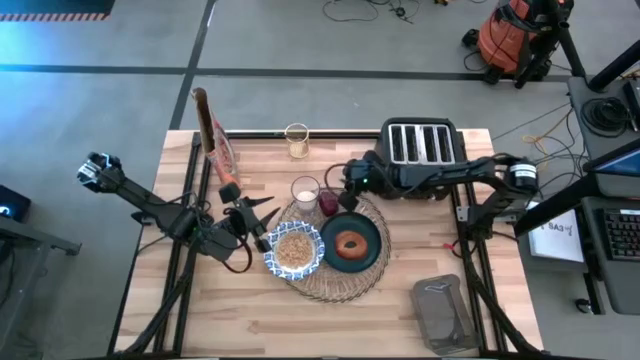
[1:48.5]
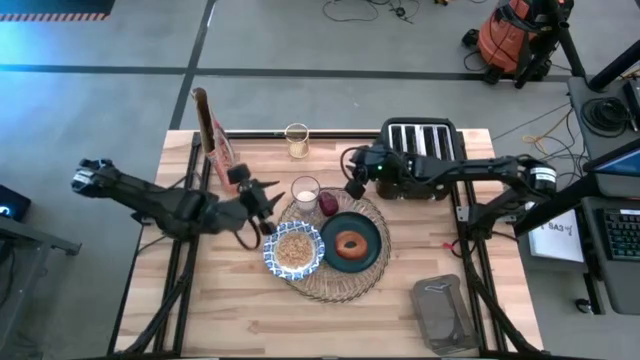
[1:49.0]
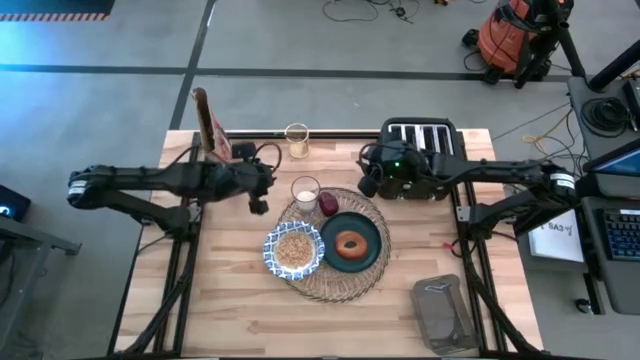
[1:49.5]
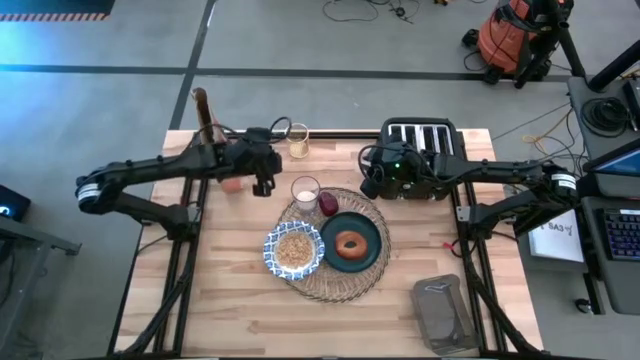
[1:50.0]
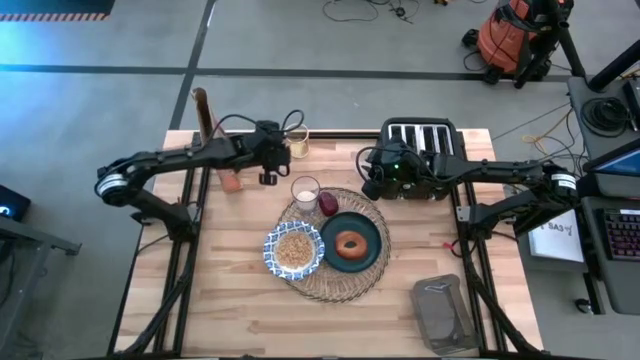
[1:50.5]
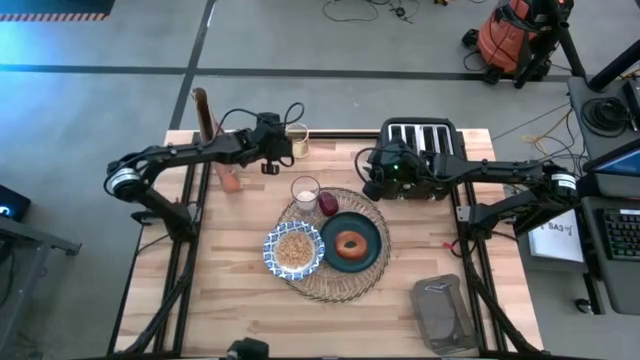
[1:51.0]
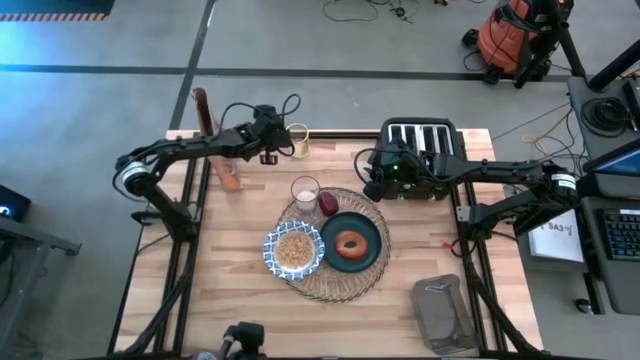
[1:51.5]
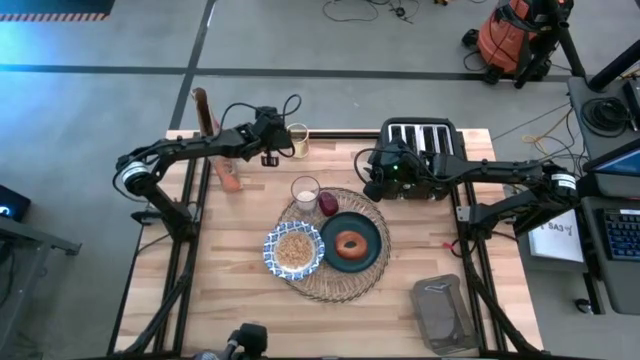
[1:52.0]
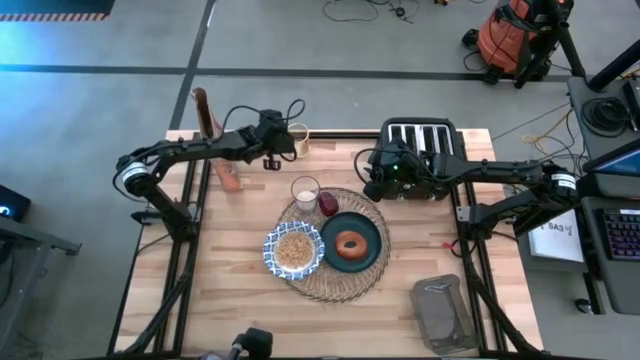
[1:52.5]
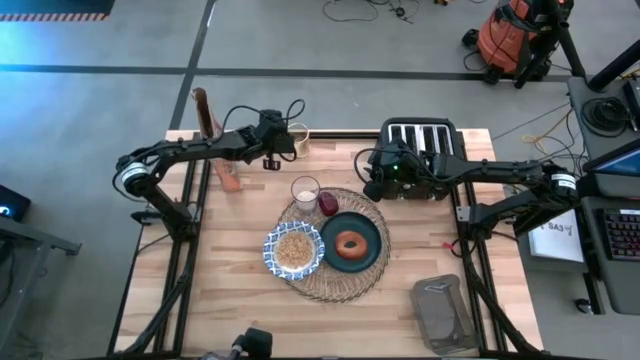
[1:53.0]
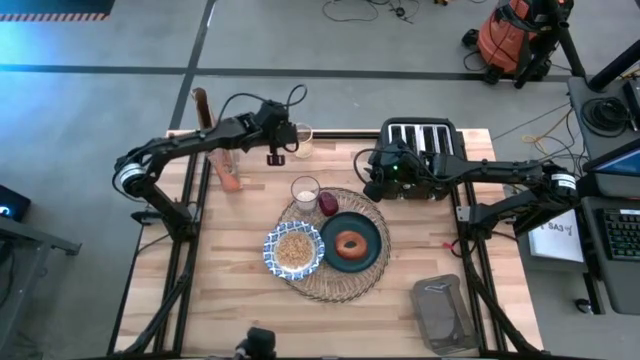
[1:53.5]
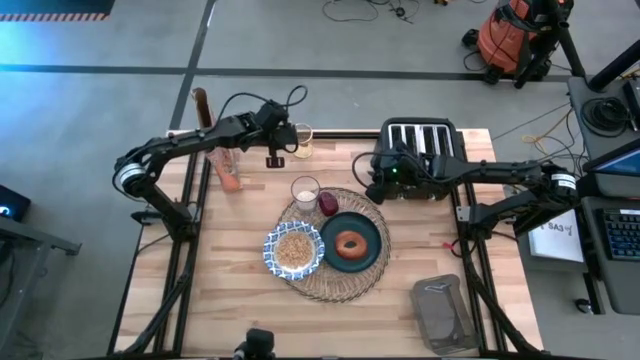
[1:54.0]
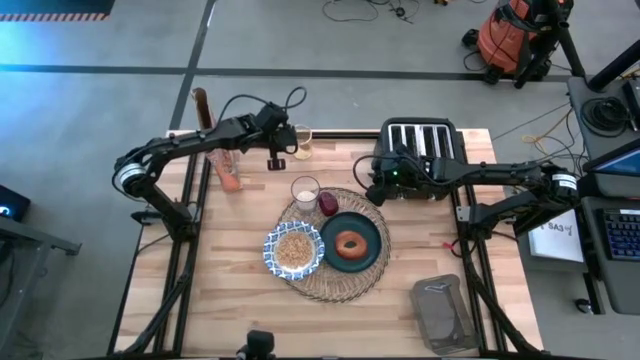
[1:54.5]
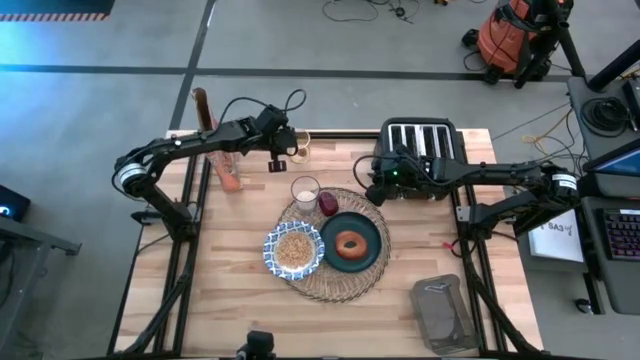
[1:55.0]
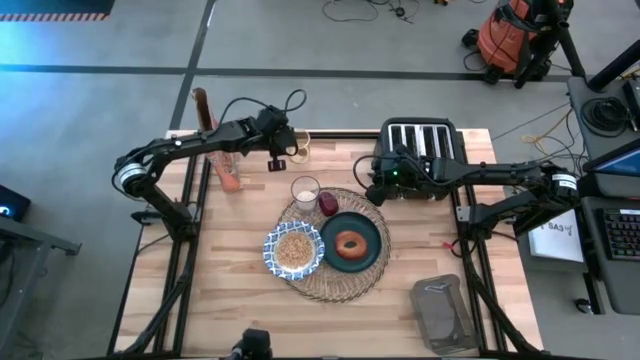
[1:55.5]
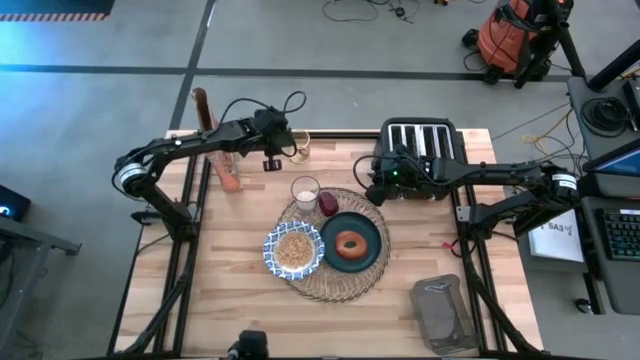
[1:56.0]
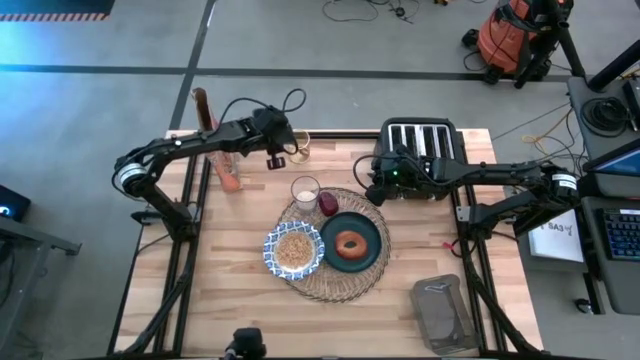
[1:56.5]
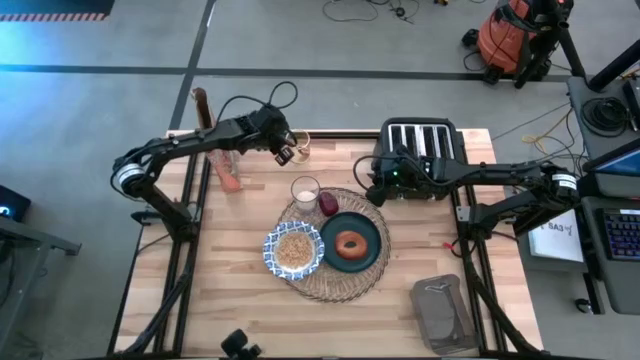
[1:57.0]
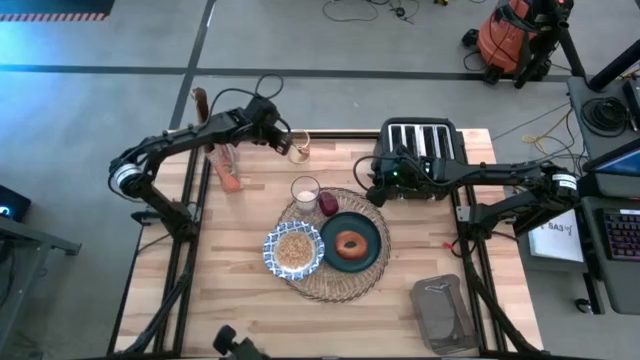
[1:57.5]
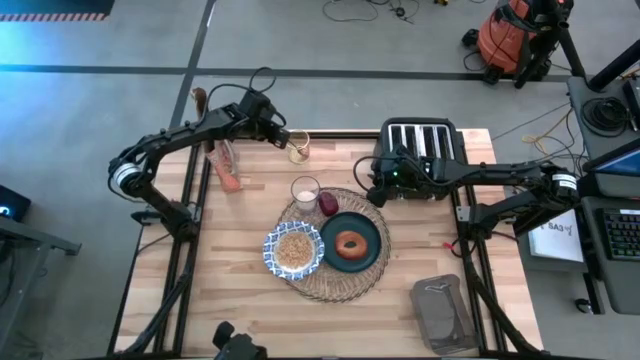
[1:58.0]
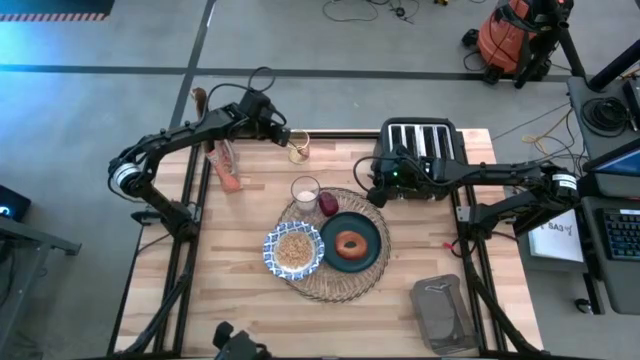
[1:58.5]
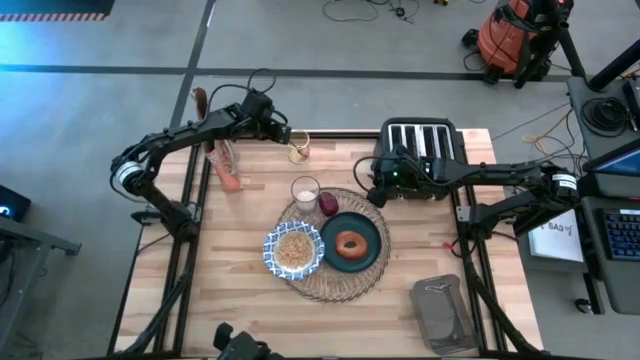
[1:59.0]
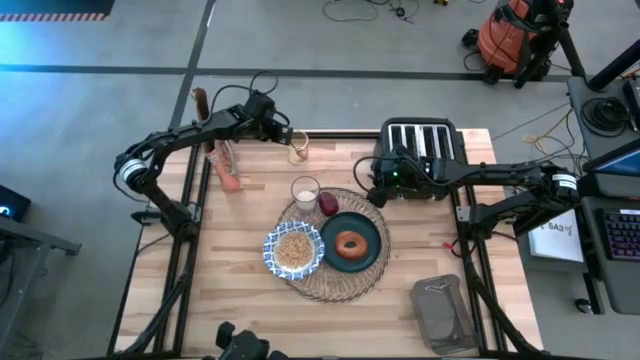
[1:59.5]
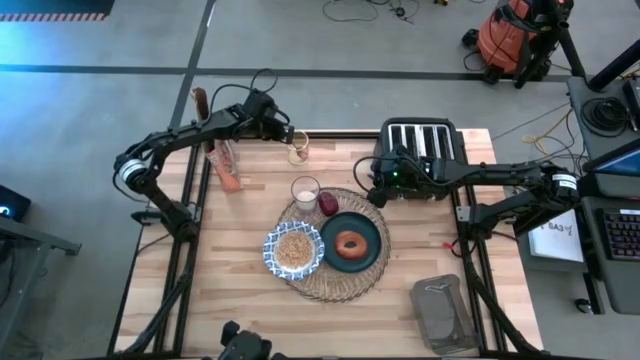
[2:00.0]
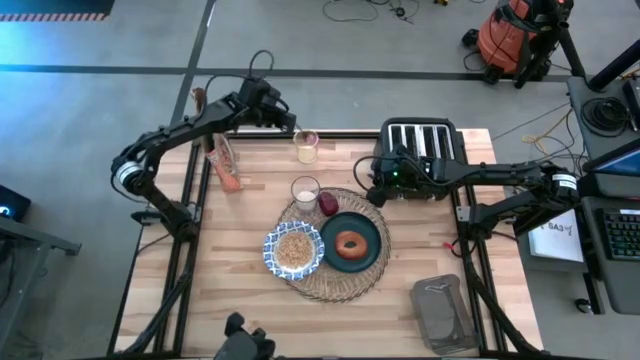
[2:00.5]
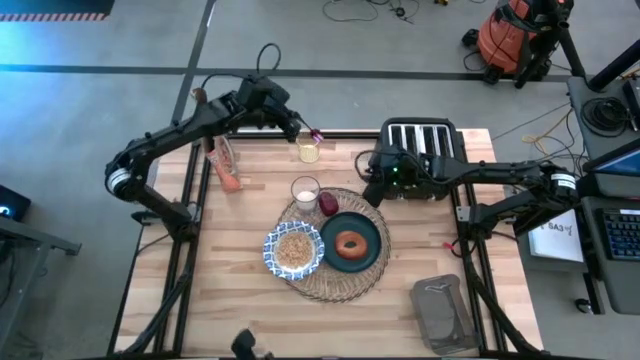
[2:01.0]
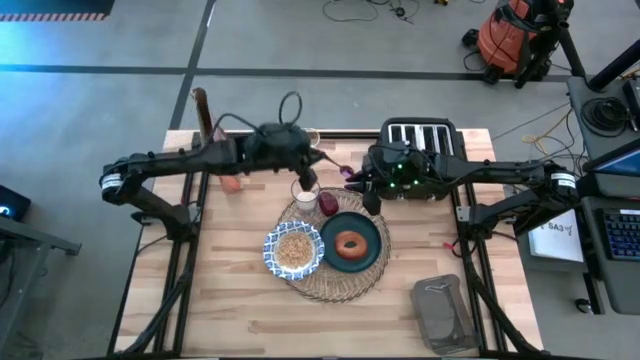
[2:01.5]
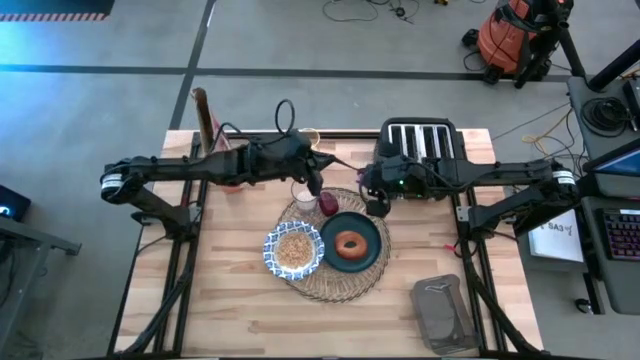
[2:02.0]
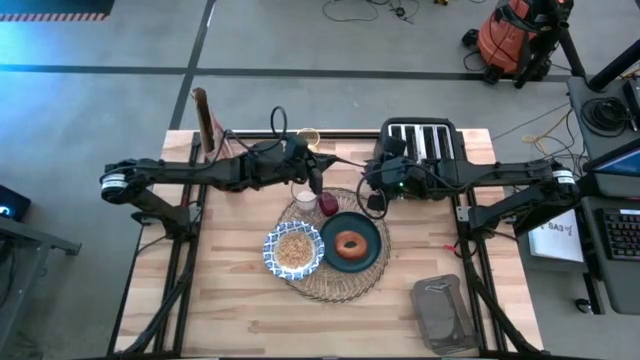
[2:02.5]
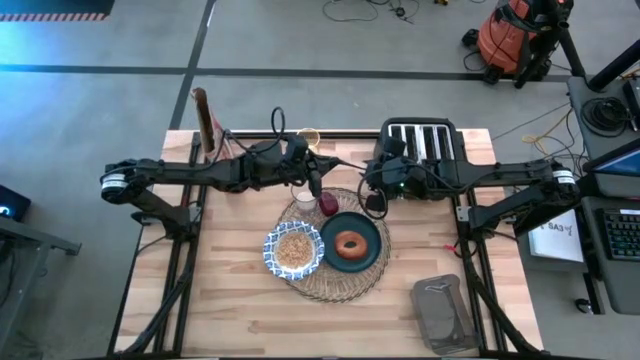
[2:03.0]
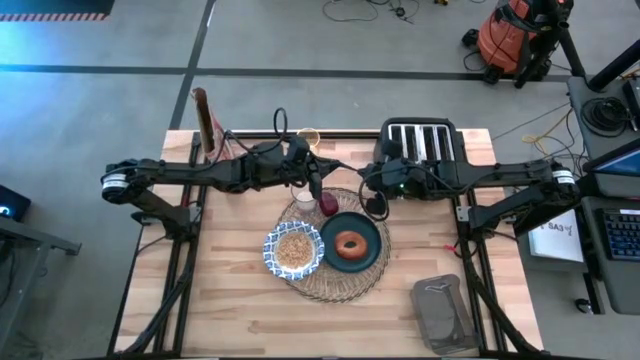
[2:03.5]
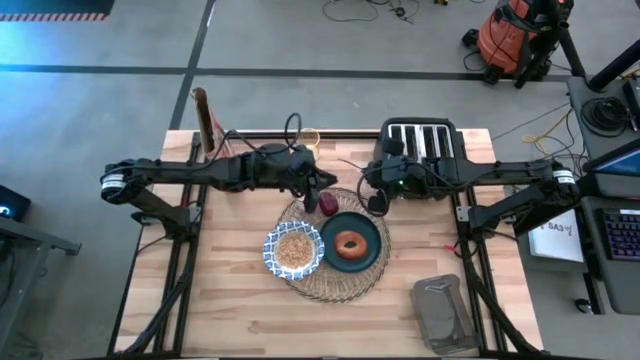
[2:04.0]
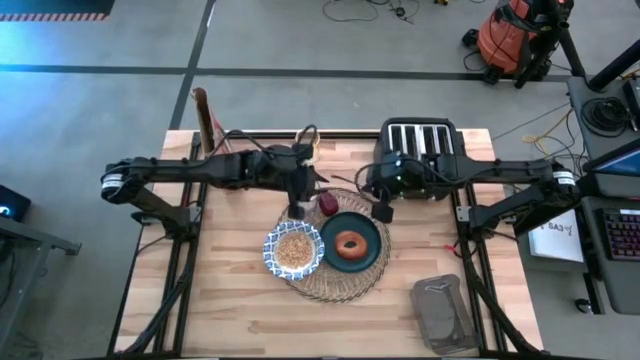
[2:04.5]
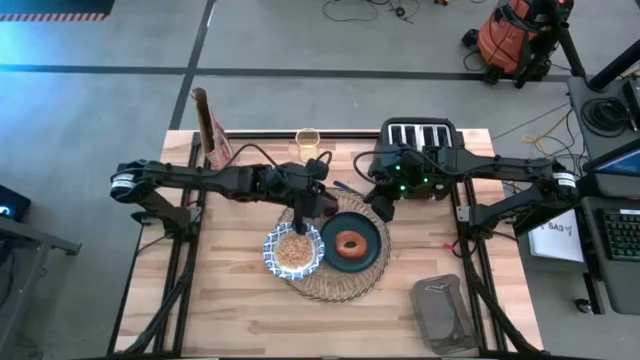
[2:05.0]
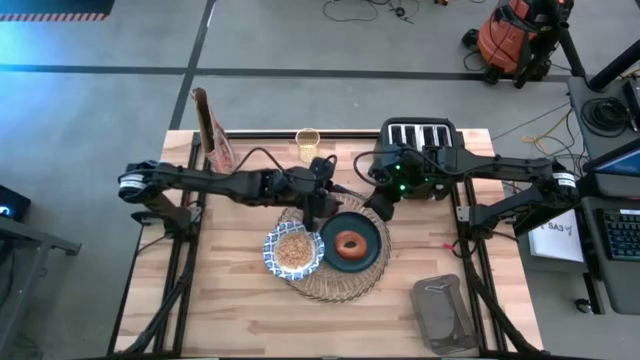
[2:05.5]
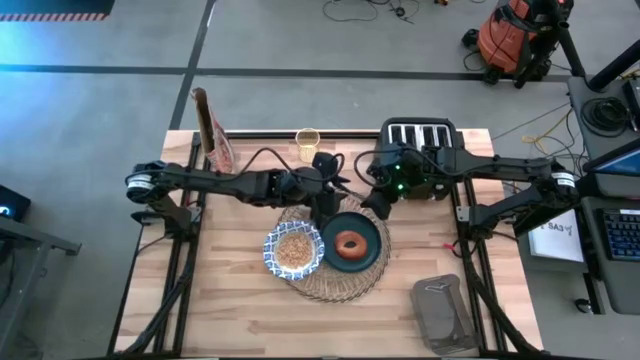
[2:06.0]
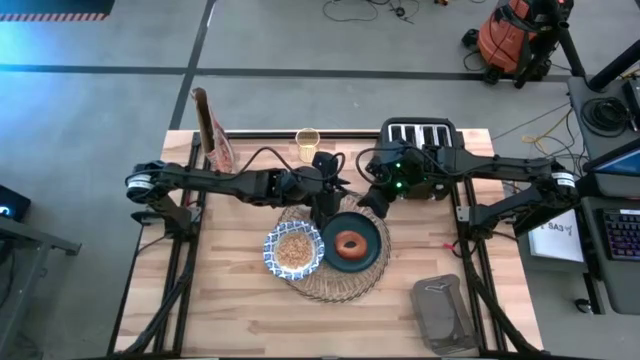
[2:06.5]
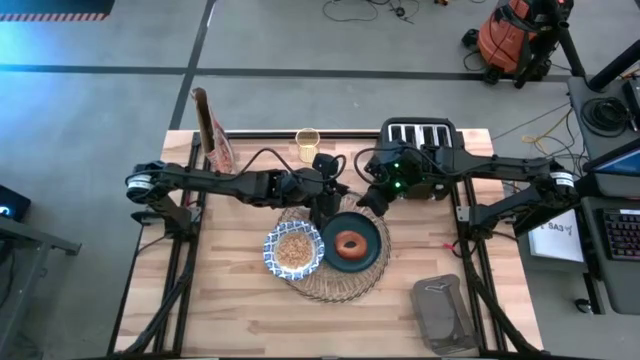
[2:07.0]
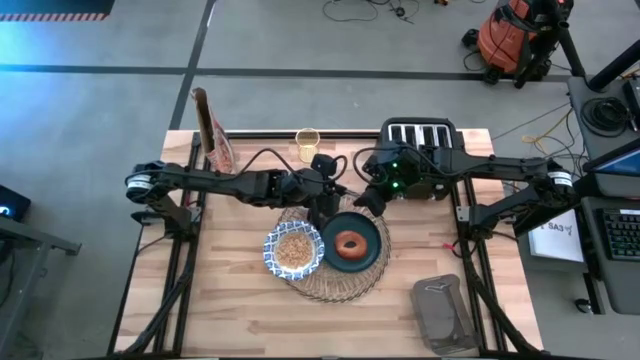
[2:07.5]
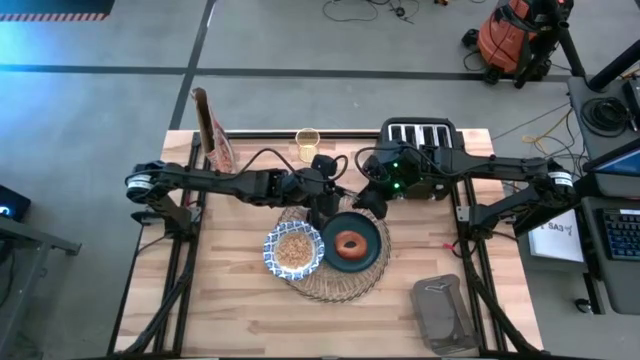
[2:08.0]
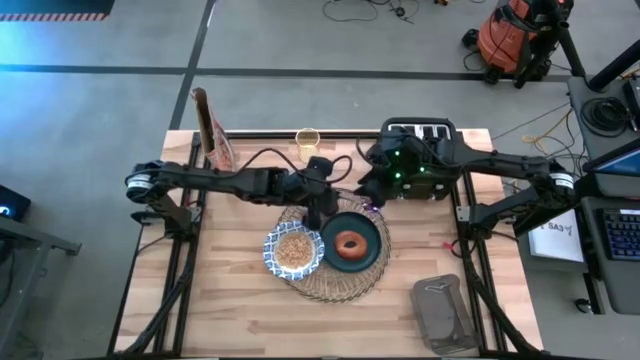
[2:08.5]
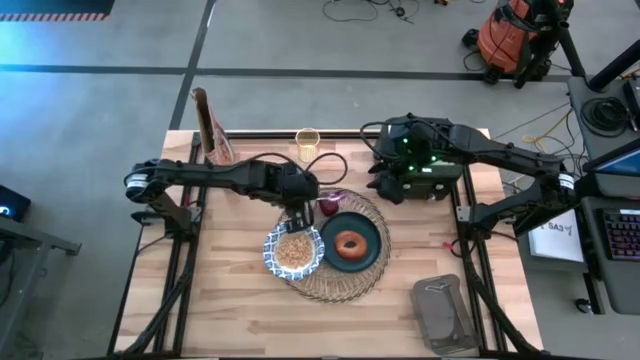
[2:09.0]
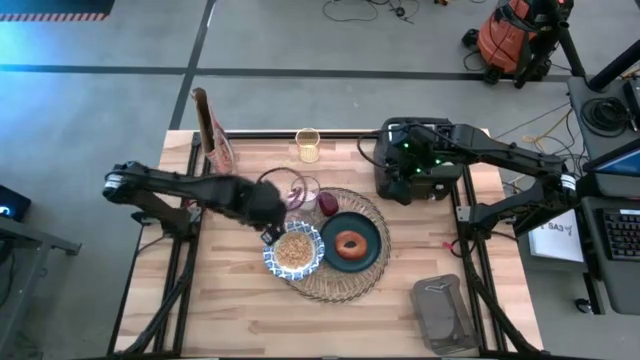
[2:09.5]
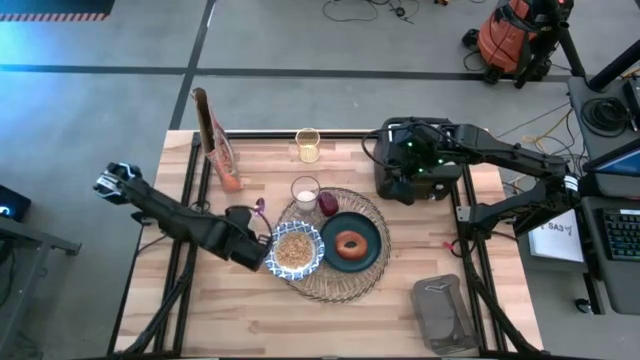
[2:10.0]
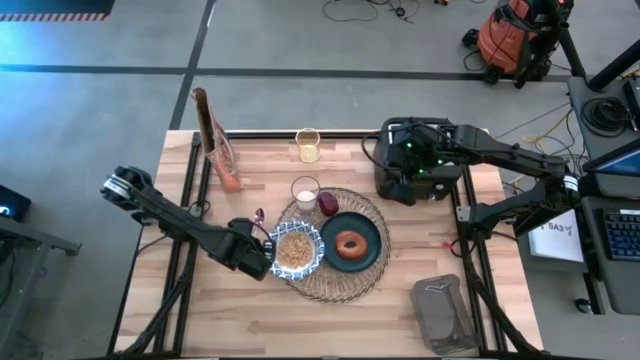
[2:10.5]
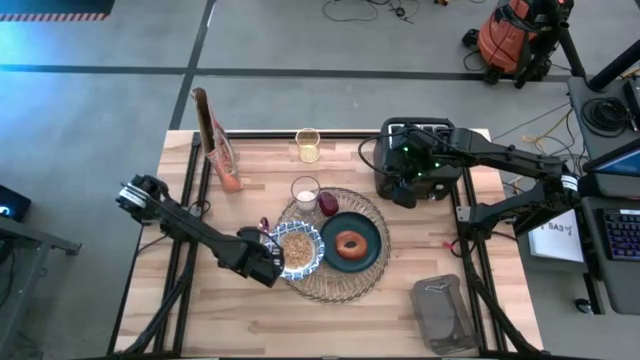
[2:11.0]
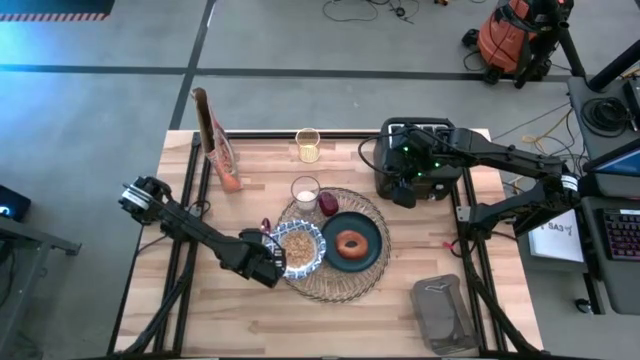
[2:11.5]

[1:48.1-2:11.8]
Task: Arrange a breakfast setting
Put the violet spoon to the left of the brown placemat
